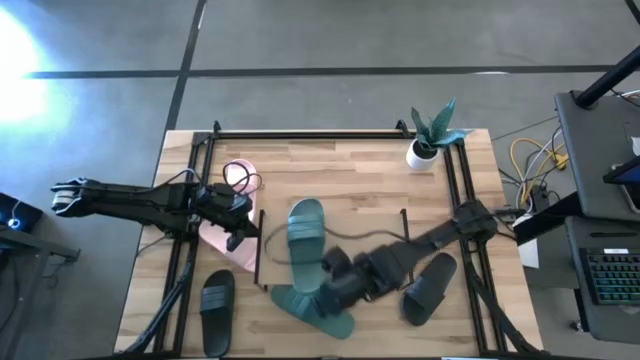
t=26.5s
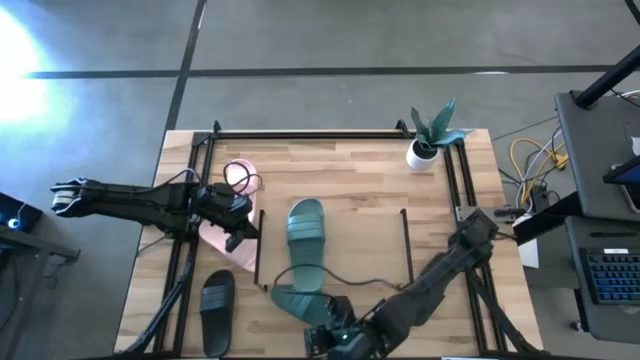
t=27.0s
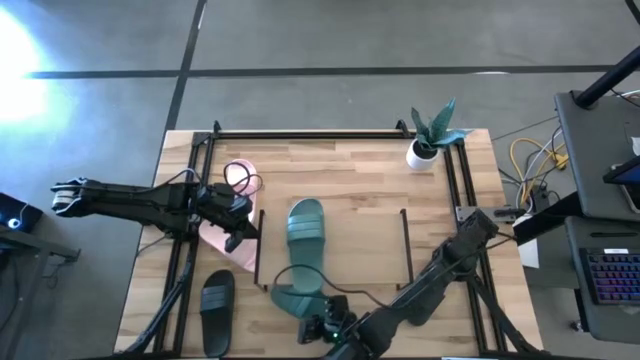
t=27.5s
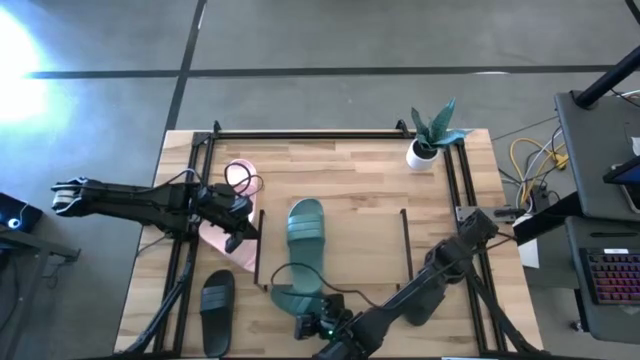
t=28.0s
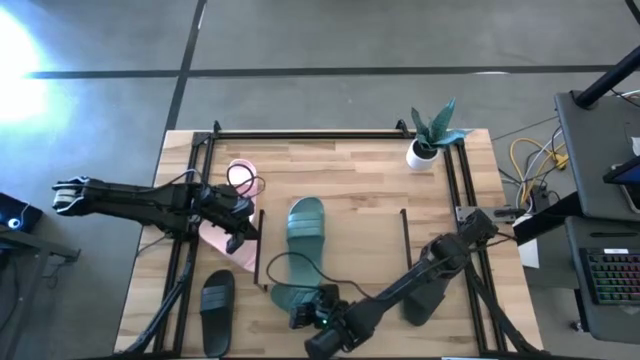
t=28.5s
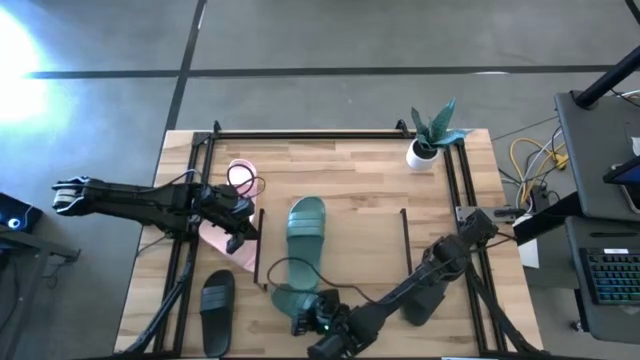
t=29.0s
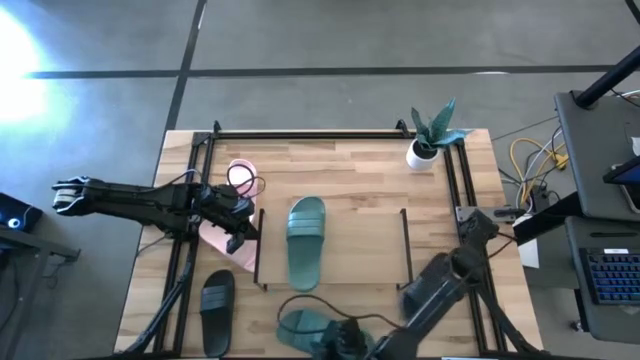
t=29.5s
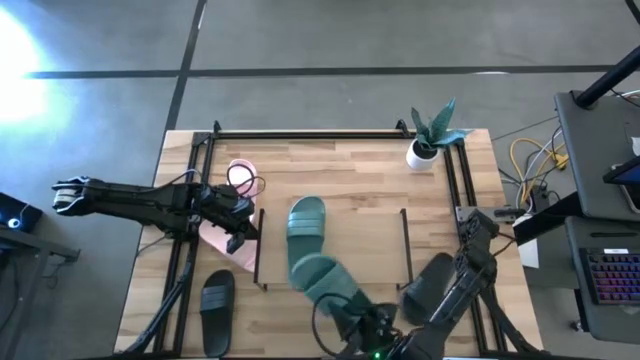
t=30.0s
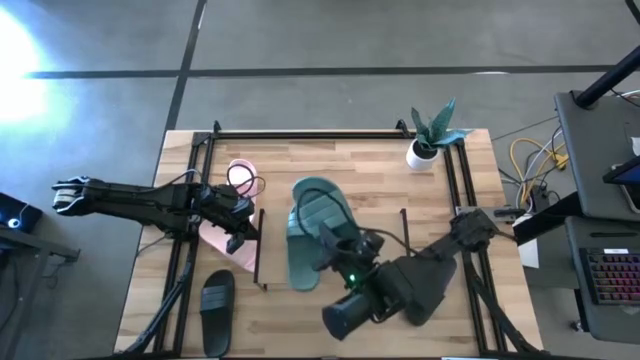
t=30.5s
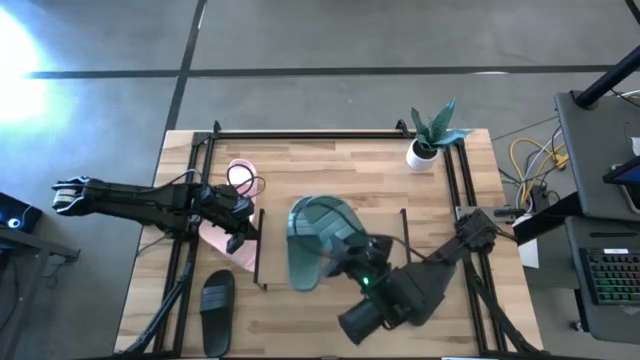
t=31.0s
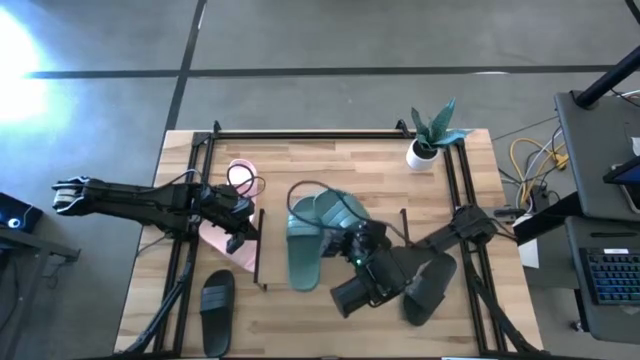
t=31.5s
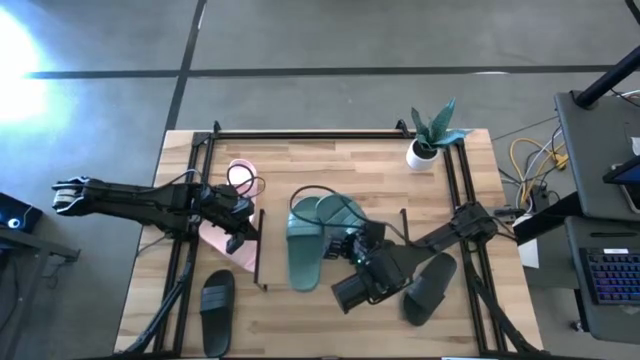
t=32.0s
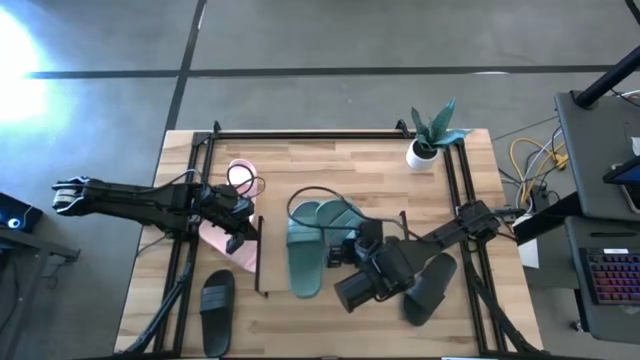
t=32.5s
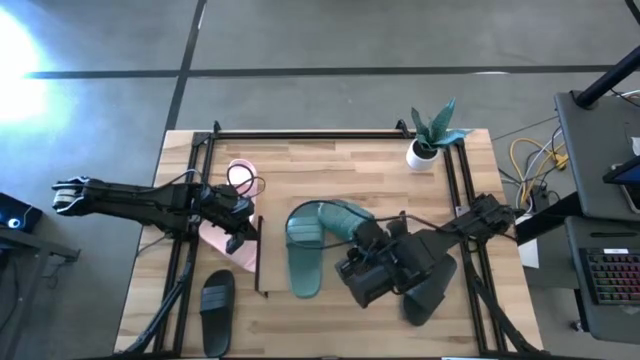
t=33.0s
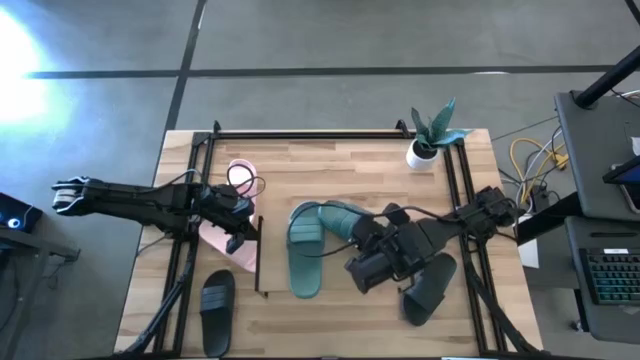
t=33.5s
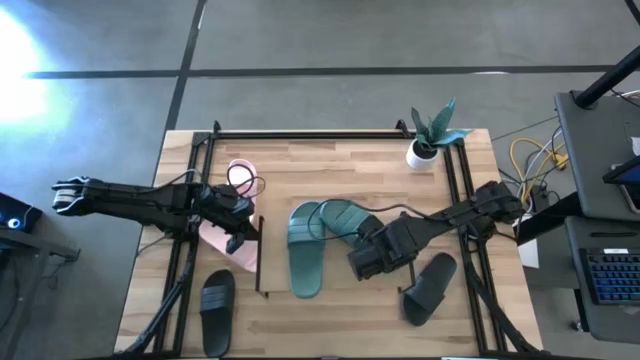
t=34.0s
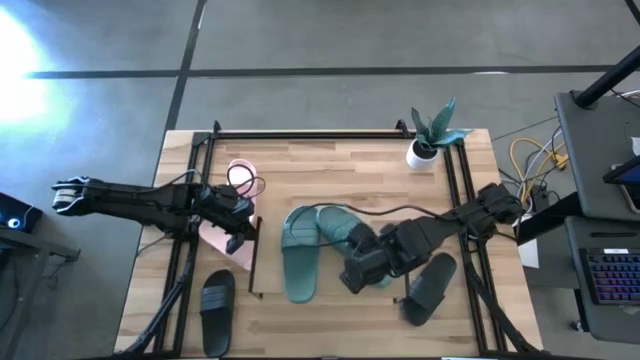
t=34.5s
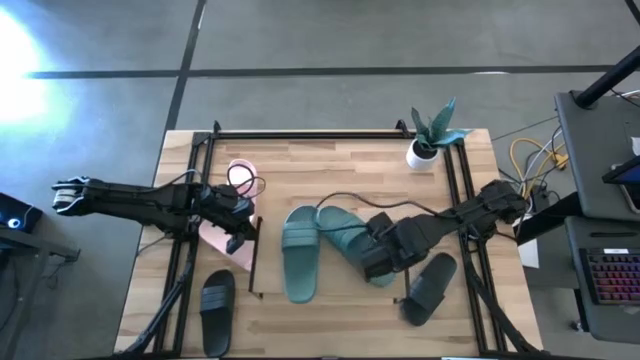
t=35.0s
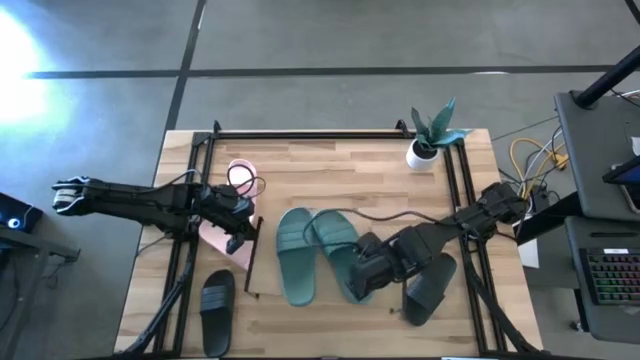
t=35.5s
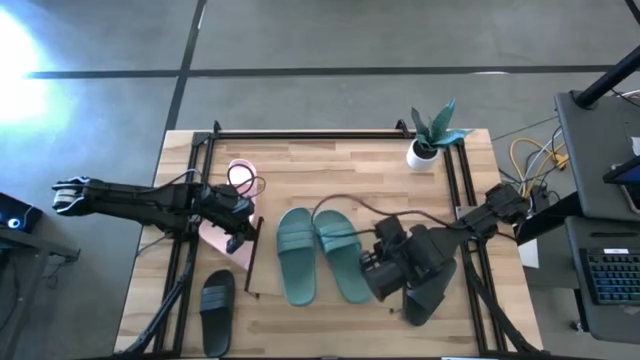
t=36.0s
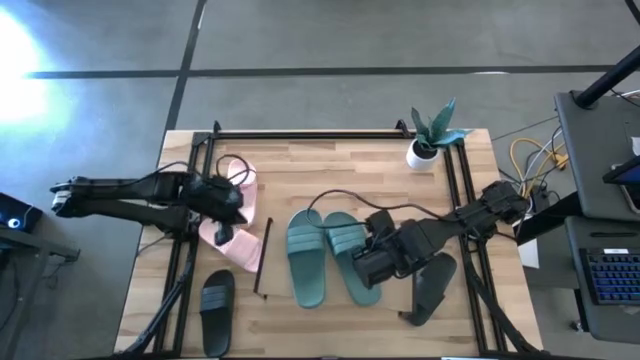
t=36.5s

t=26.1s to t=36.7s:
Task: Pick and place slides into the shelf
Put the green slide on the shelf

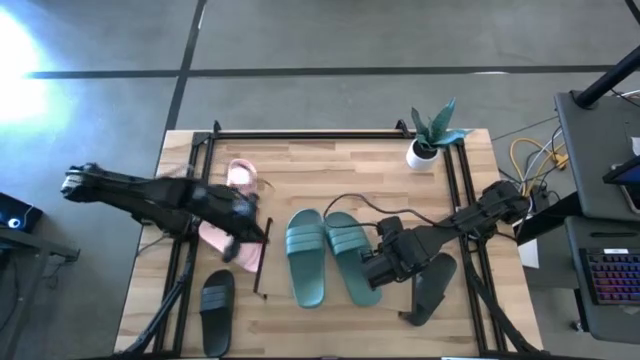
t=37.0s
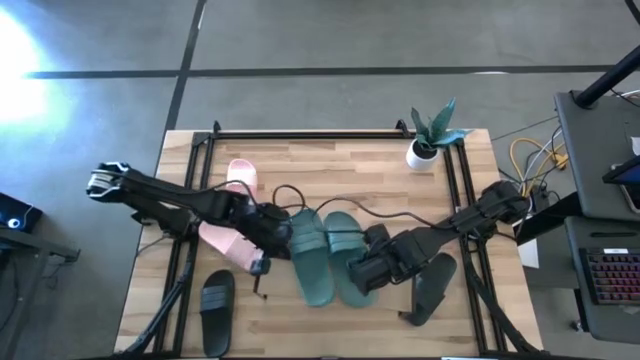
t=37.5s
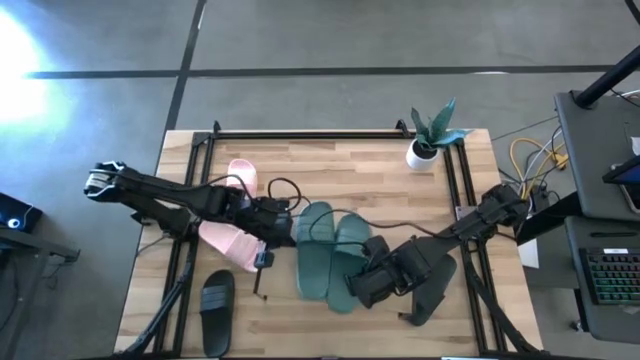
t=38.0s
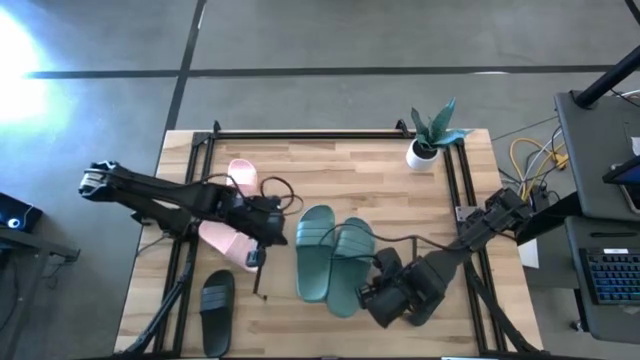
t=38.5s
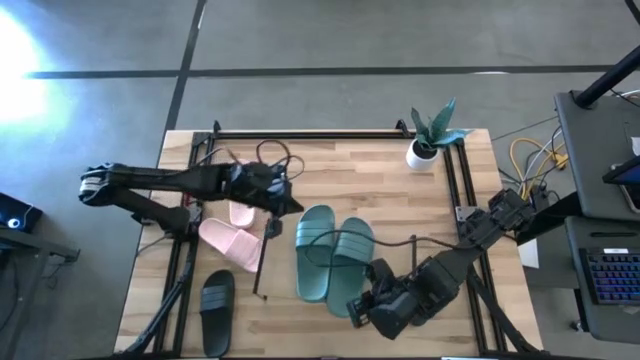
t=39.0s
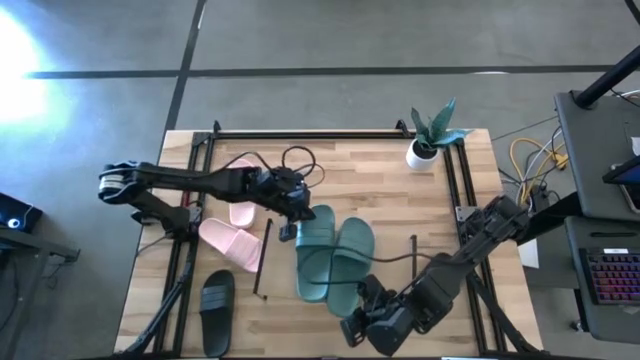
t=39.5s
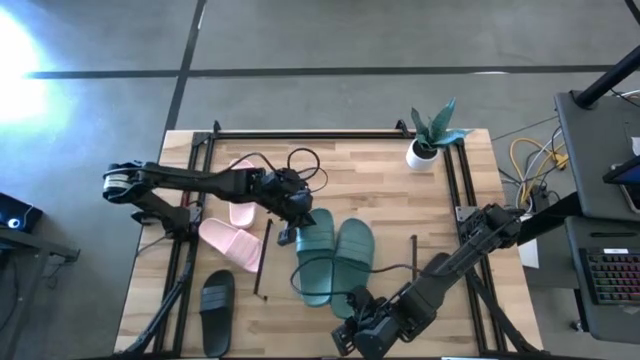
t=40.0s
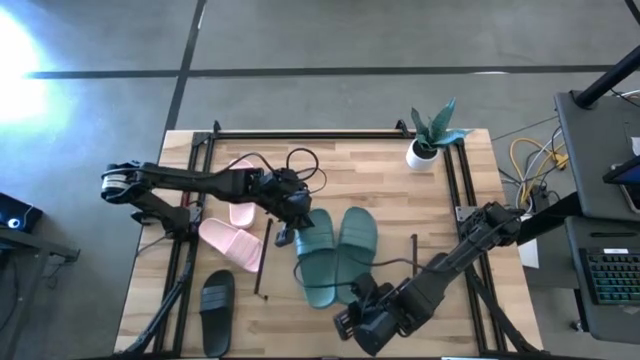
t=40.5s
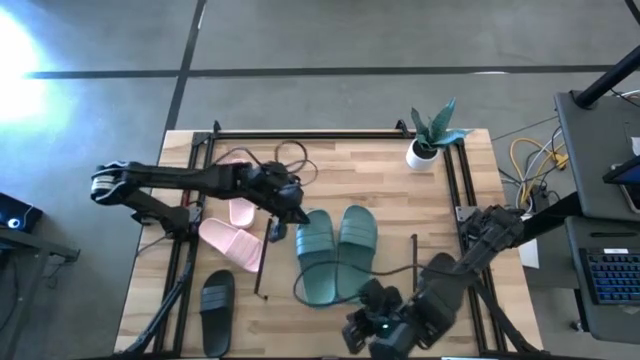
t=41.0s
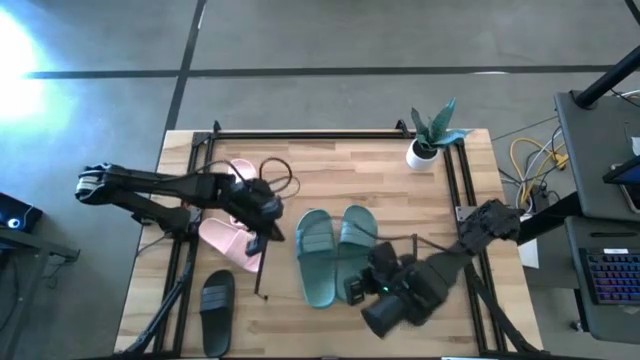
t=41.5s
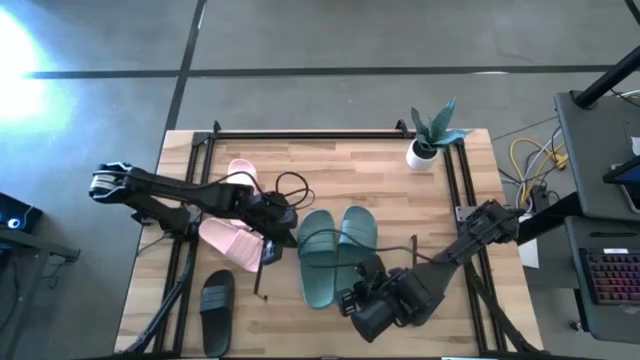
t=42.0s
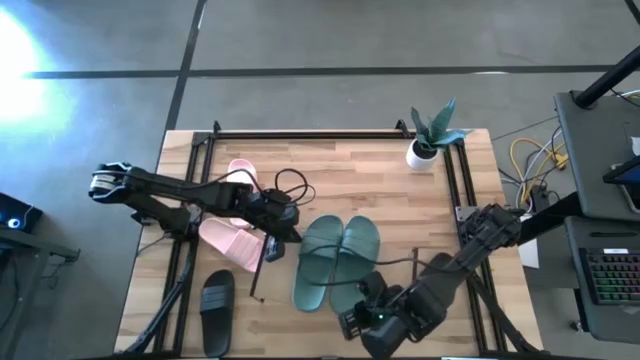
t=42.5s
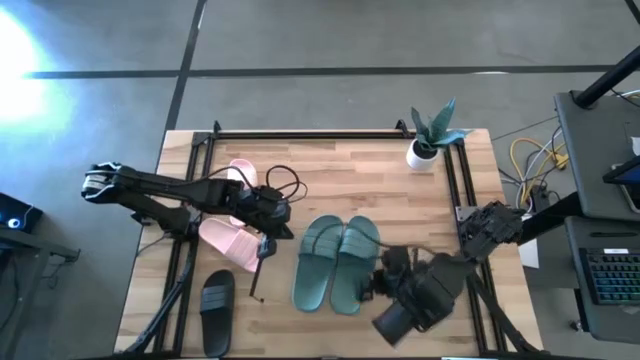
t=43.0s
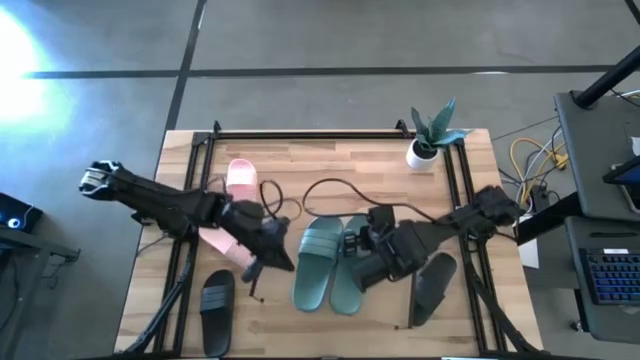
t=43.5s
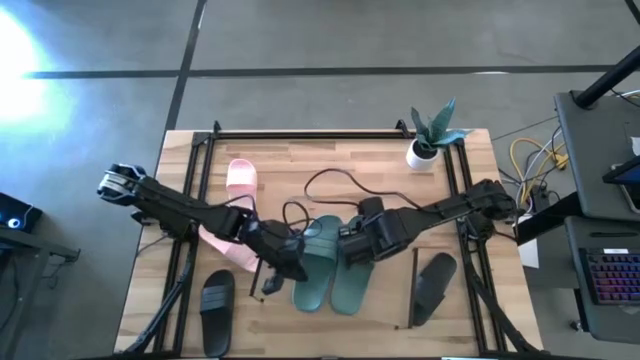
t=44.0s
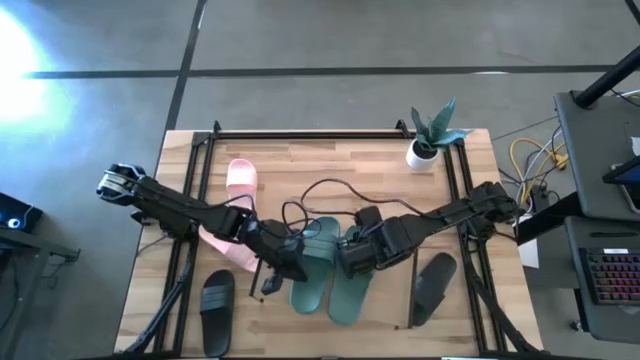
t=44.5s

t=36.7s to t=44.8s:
Adjust the green slides on the shelf

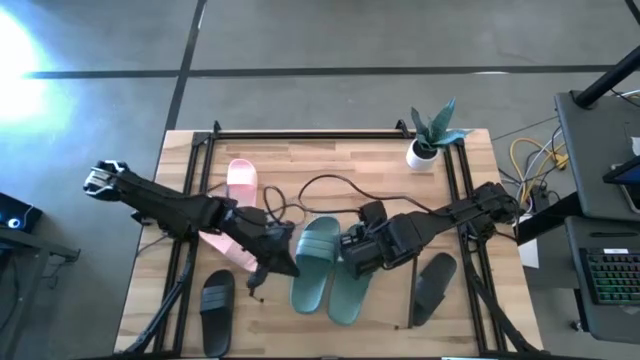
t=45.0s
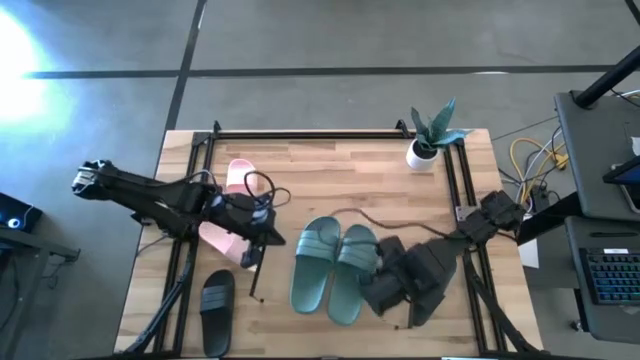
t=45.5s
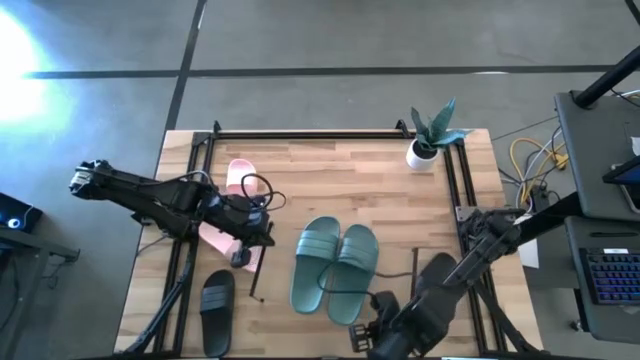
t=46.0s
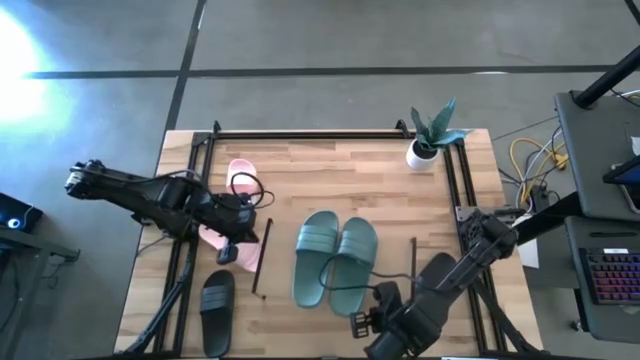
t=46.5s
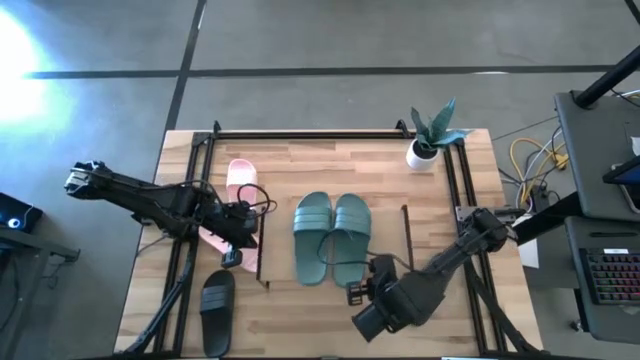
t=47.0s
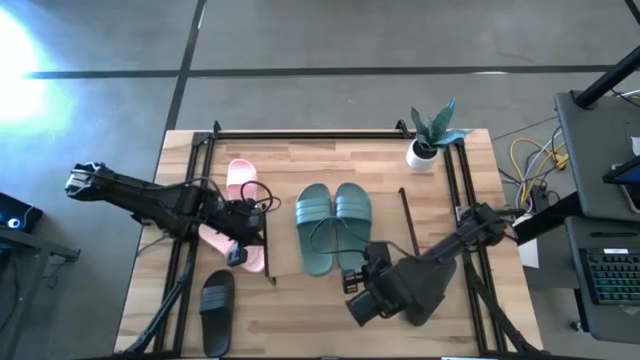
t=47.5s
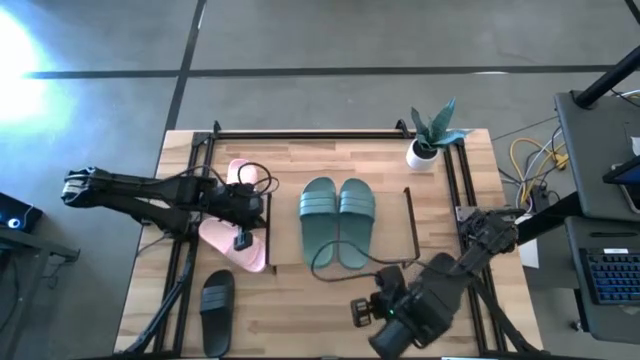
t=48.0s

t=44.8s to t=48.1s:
Adjust the shelf in the center

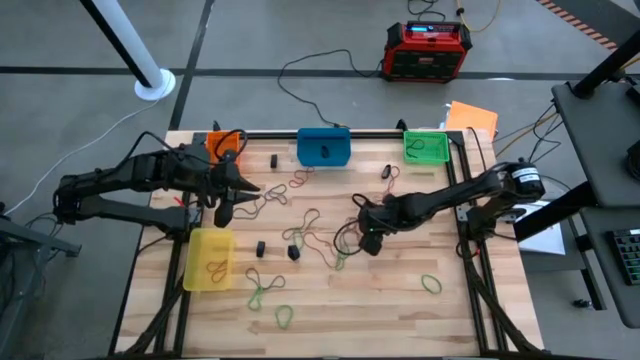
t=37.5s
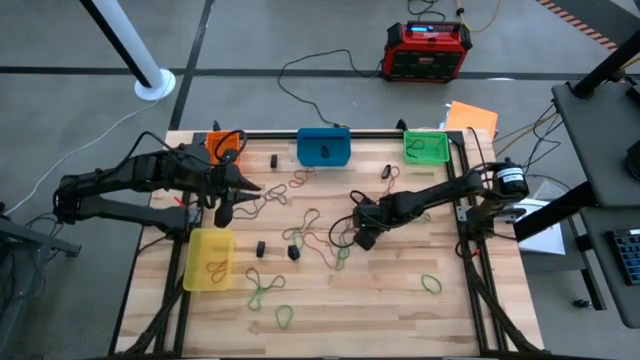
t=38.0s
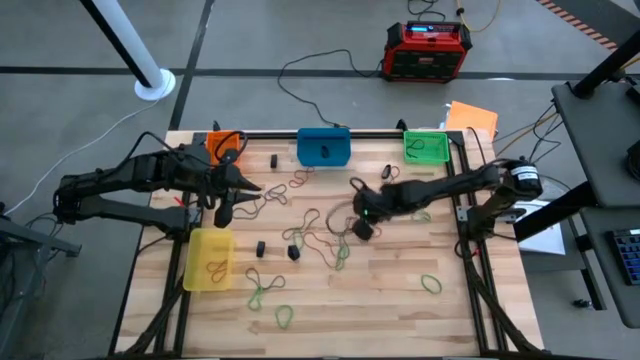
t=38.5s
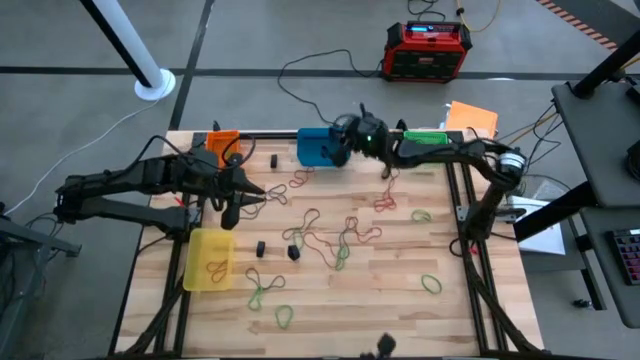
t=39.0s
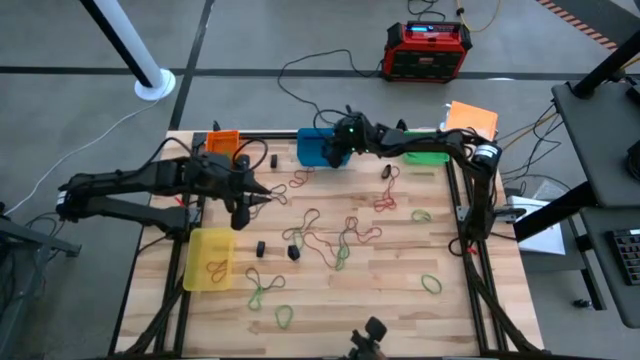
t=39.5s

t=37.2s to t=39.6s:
Task: Sort rubber bands into baskets
Put the black rubber band into the blue bin
